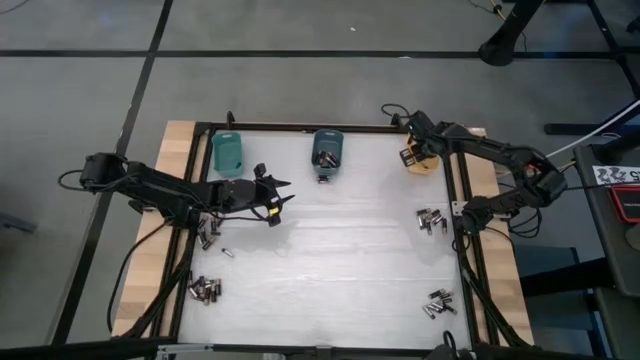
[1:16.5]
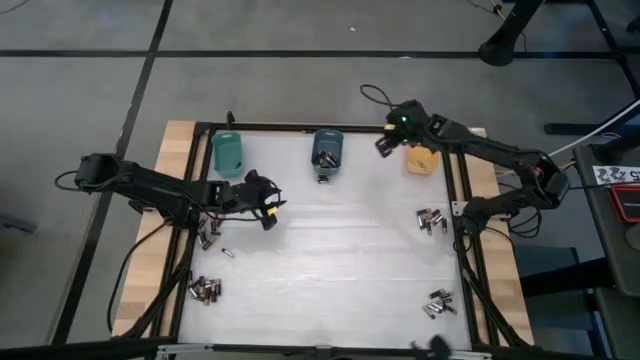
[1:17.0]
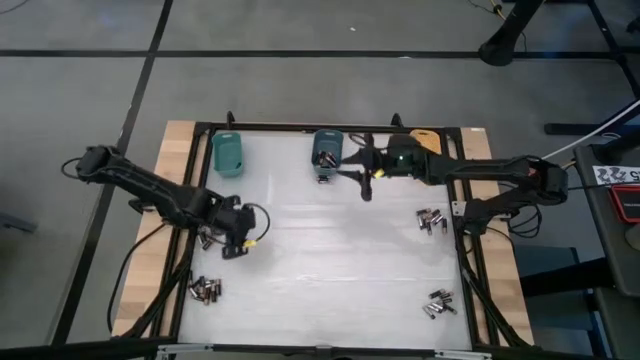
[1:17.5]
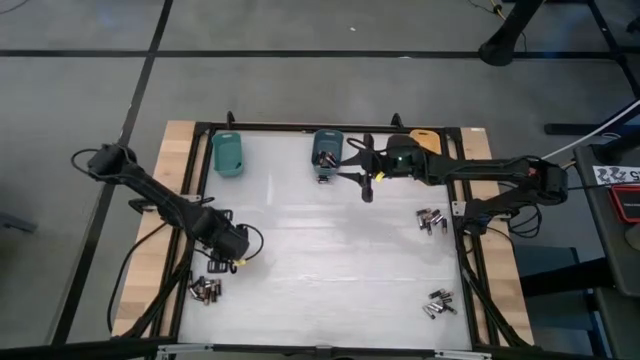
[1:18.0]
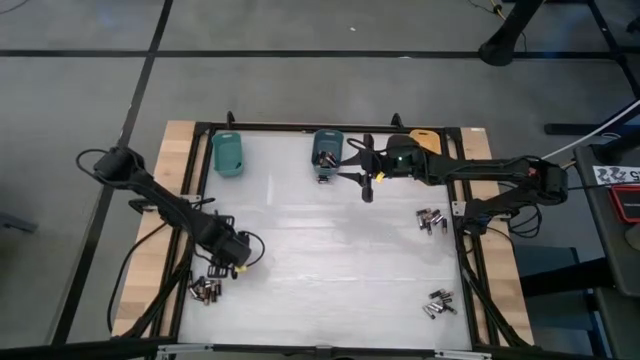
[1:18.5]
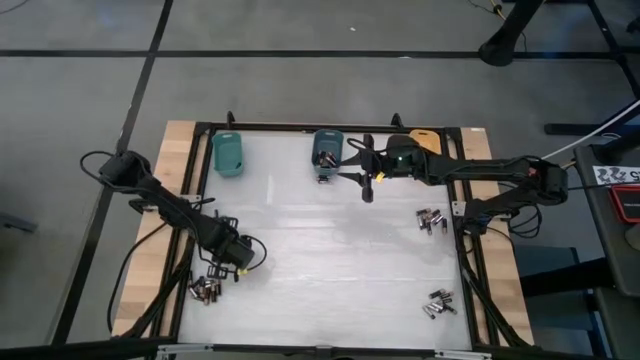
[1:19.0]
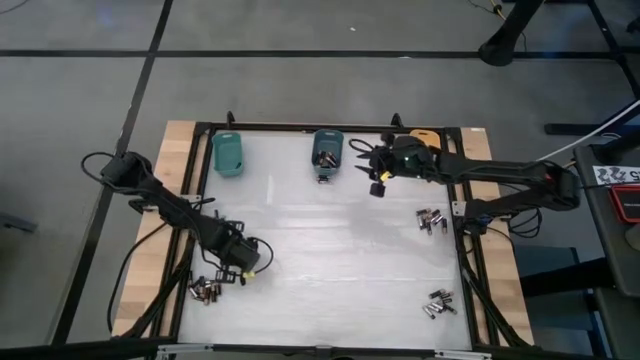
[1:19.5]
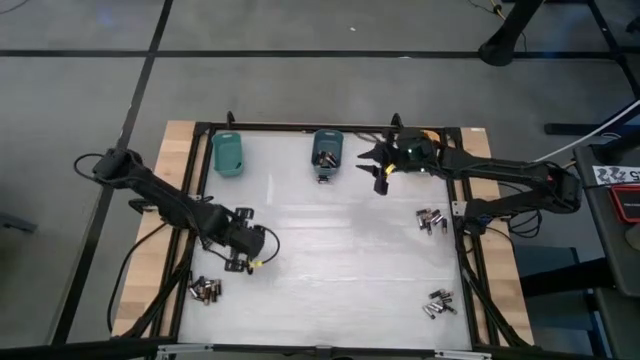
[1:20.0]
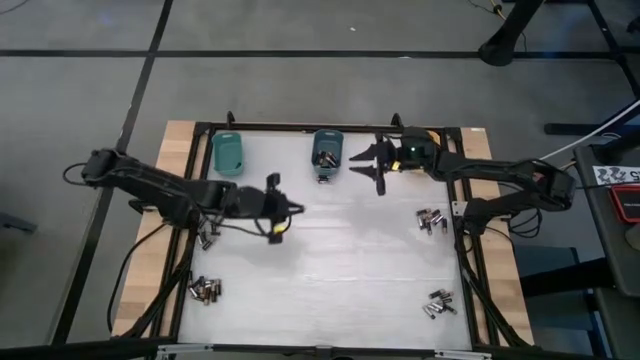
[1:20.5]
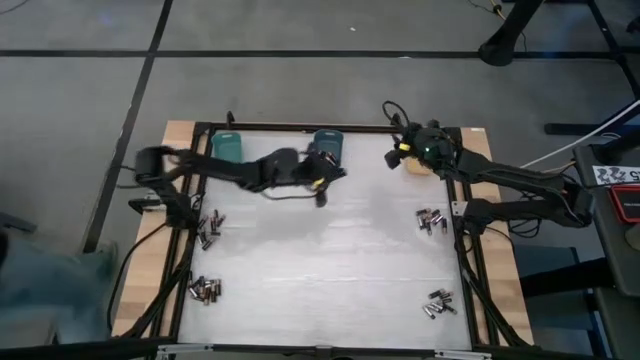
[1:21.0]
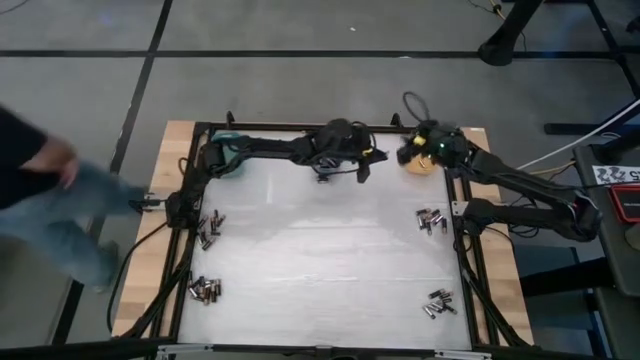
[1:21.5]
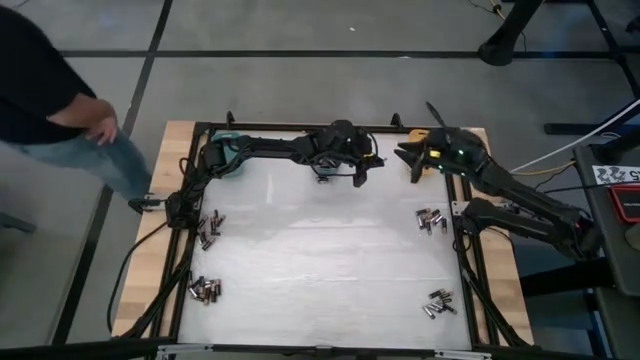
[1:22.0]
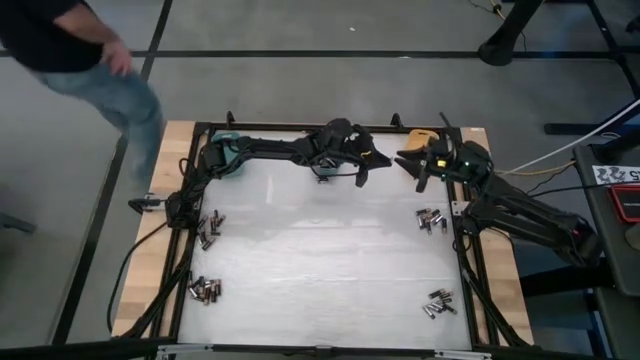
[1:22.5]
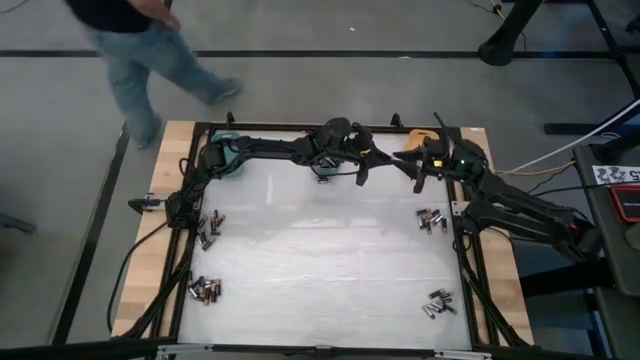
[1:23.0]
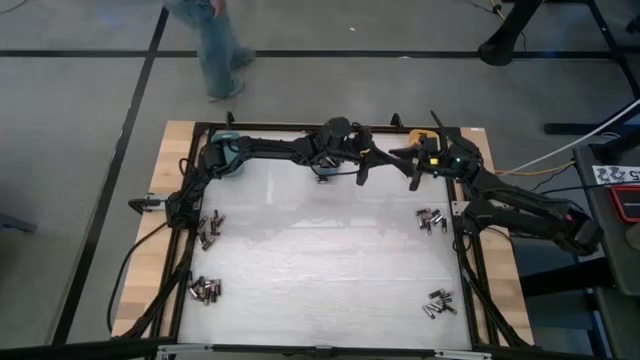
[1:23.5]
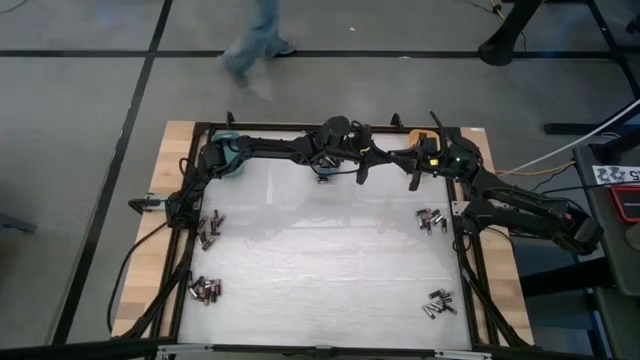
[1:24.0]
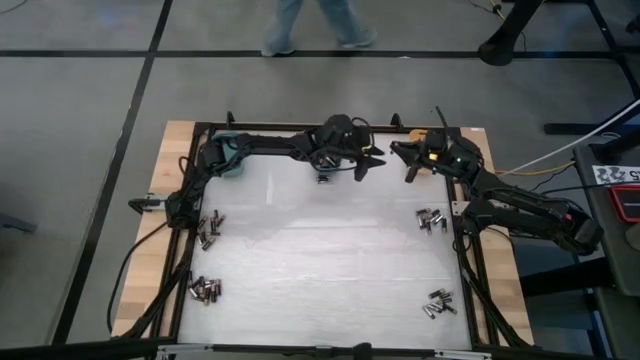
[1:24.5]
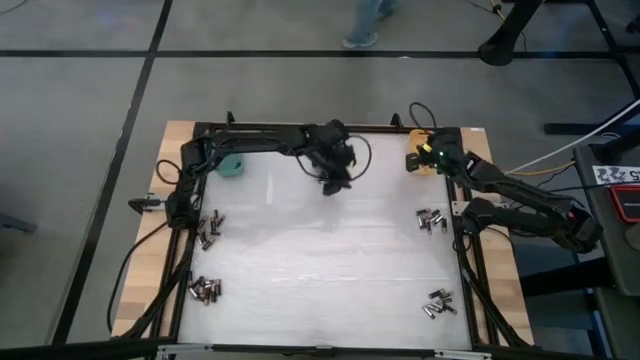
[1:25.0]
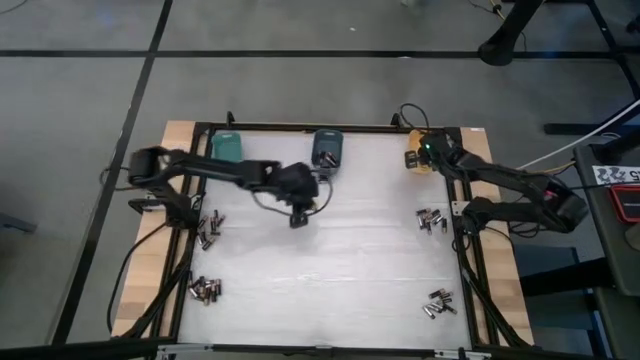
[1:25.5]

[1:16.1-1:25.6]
Task: Sort batteries
Put the silver battery into the yellow bin

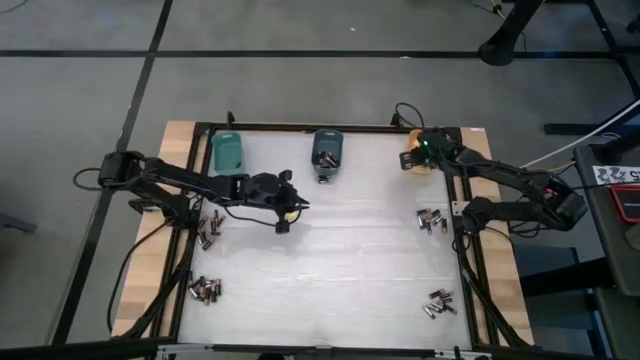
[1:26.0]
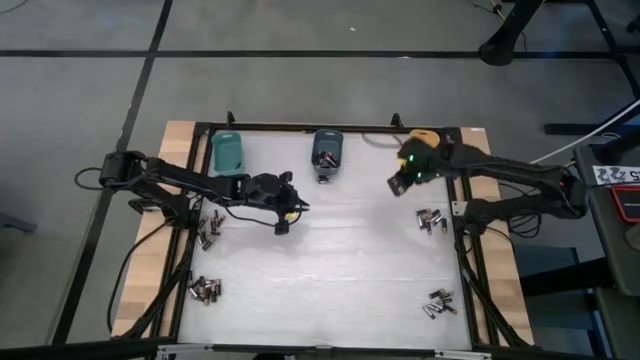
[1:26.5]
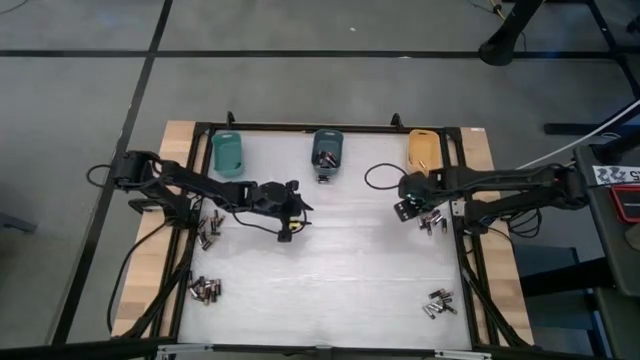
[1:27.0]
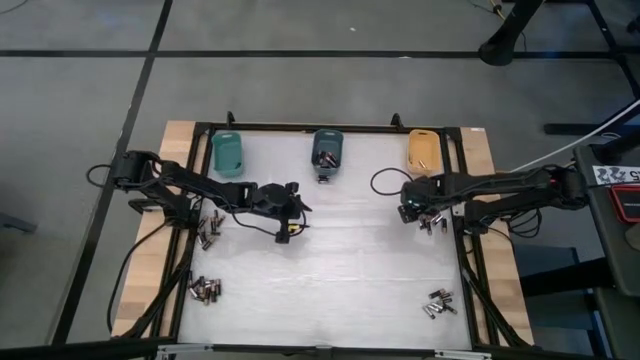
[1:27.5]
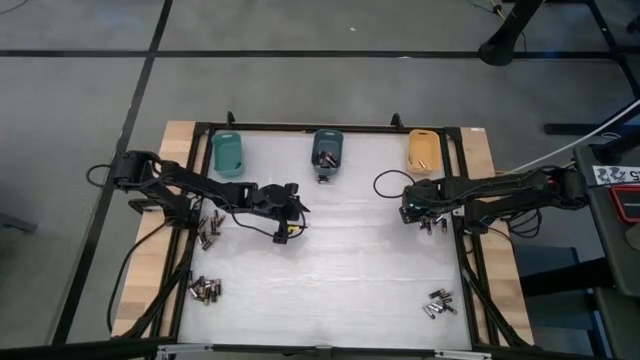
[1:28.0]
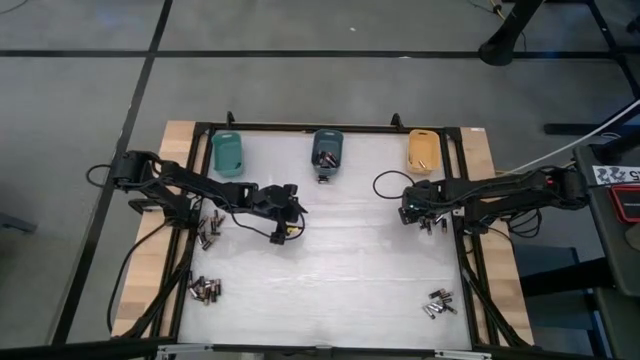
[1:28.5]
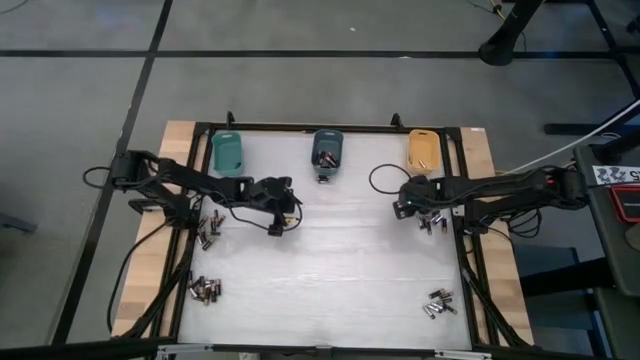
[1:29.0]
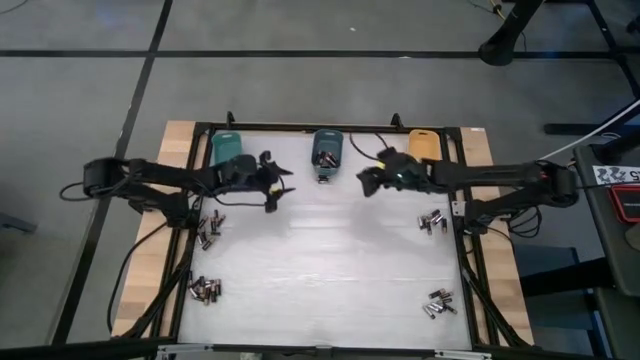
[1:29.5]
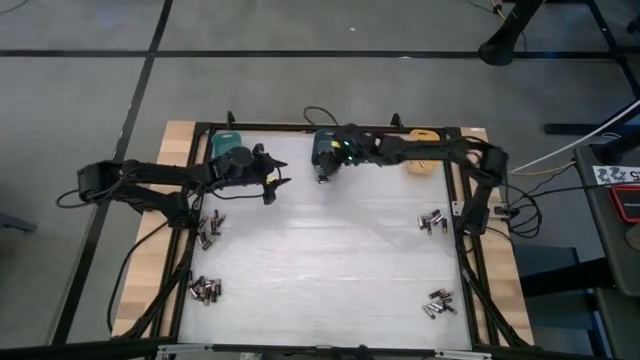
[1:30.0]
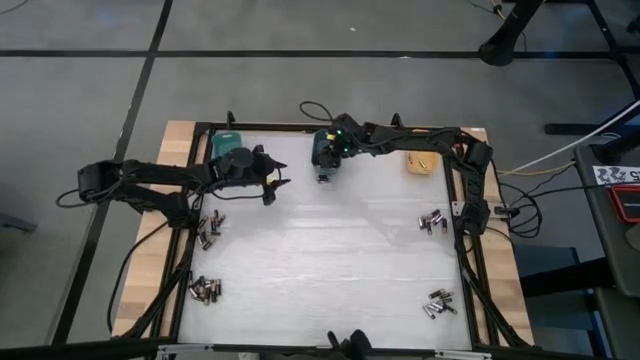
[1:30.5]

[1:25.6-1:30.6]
Put the brown battery into the blue bin

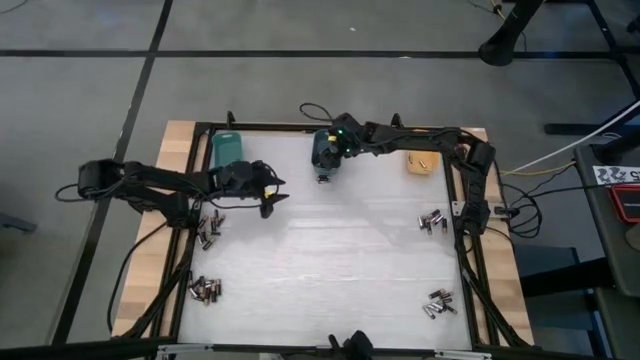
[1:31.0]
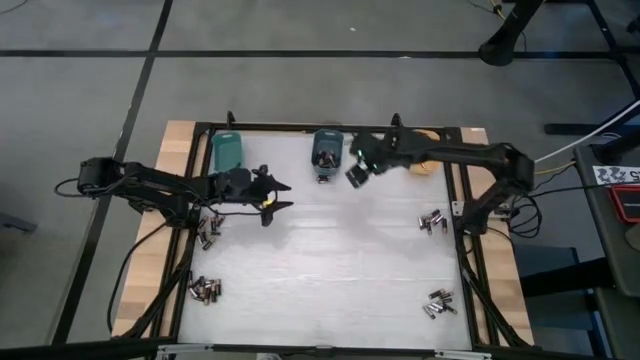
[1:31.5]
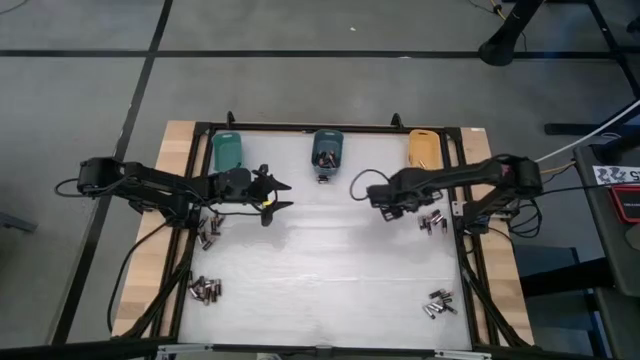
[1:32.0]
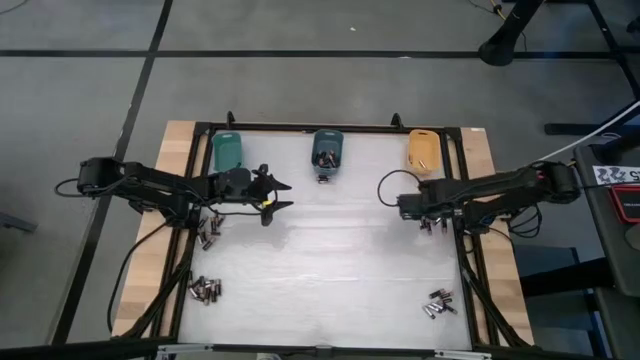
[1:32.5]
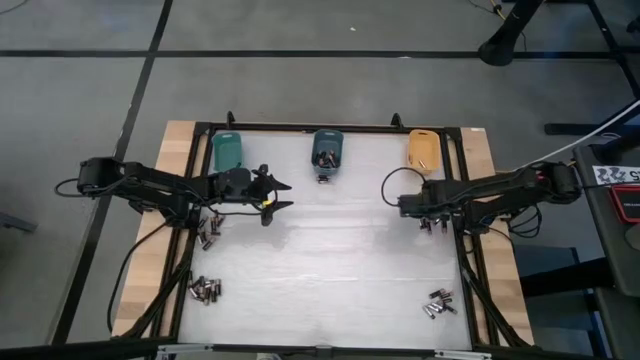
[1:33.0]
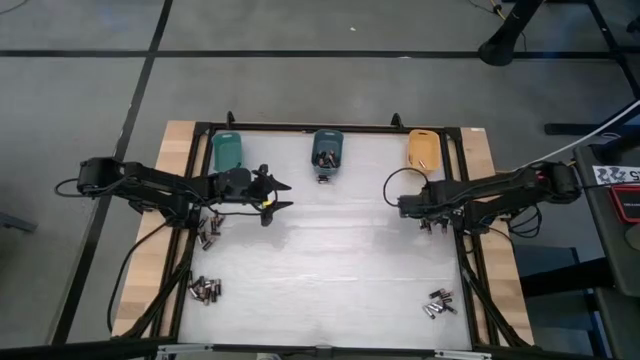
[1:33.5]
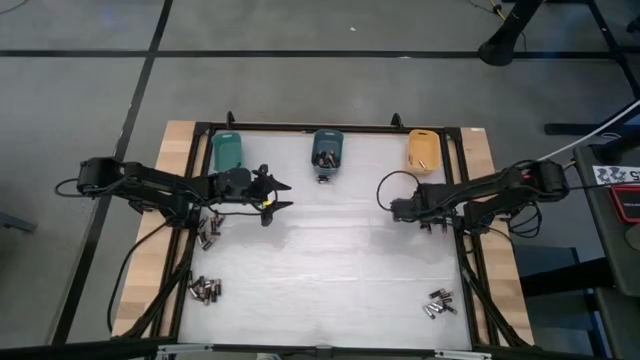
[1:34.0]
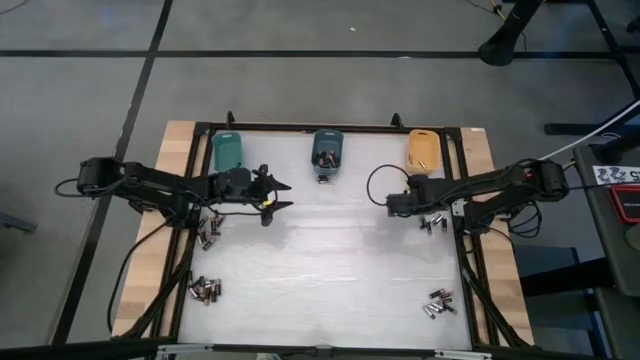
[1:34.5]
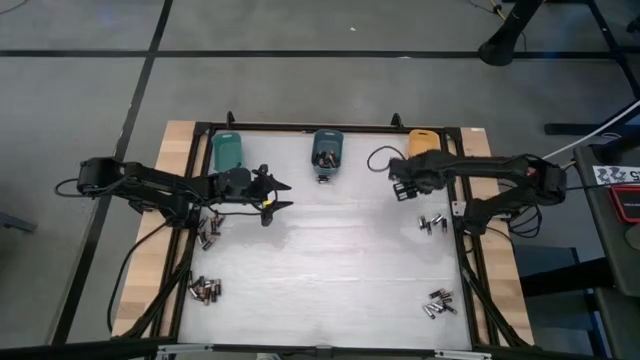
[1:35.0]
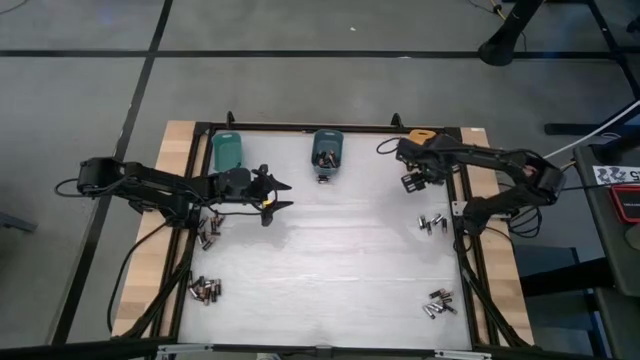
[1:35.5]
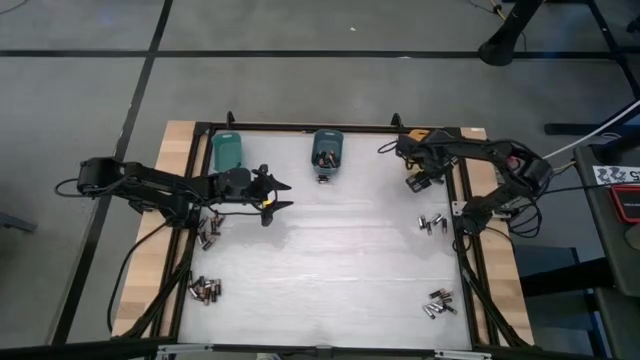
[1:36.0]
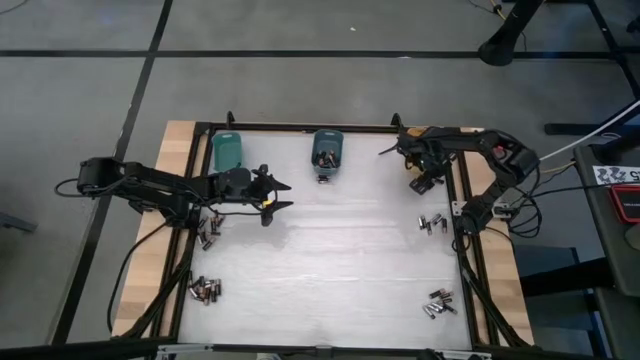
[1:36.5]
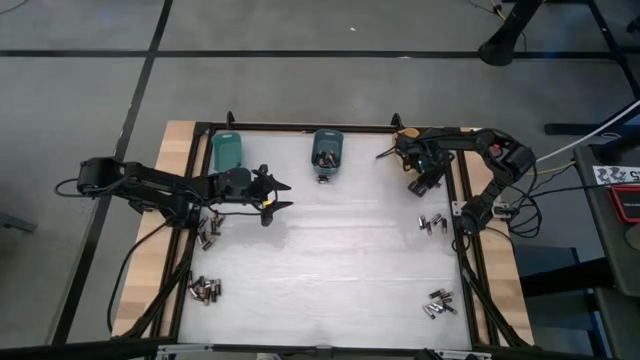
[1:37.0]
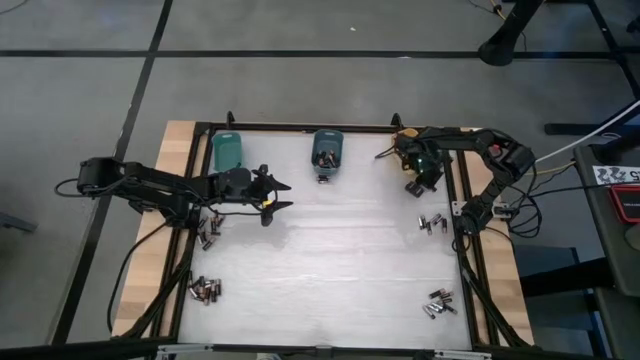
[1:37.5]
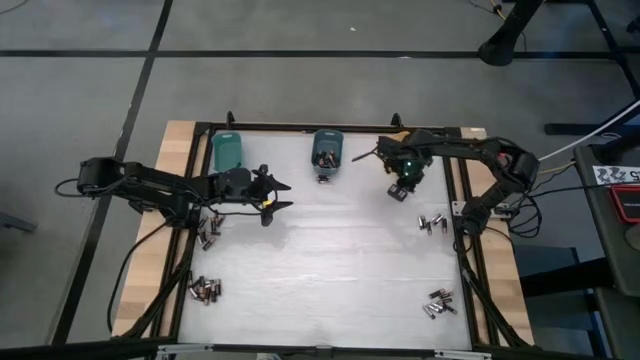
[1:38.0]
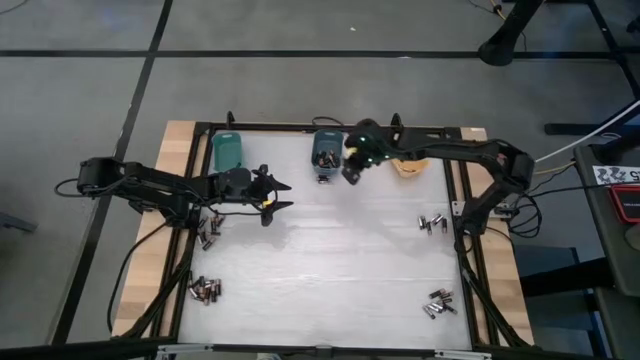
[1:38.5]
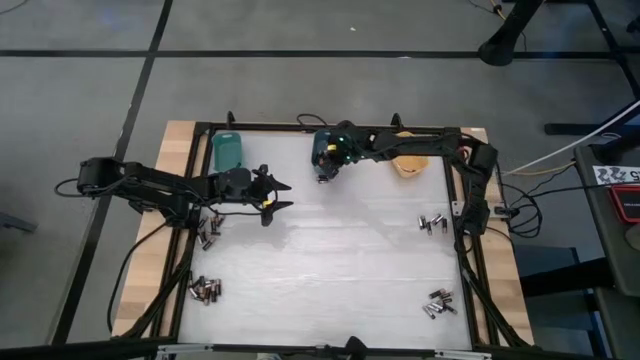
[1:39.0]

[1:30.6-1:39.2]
Put the brown battery into the blue bin
